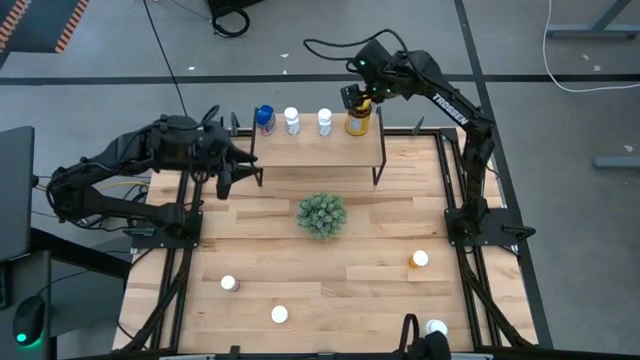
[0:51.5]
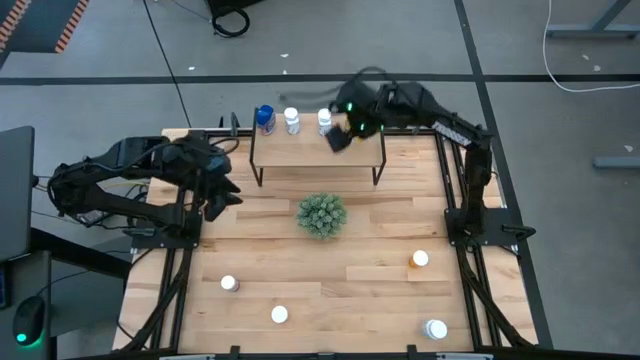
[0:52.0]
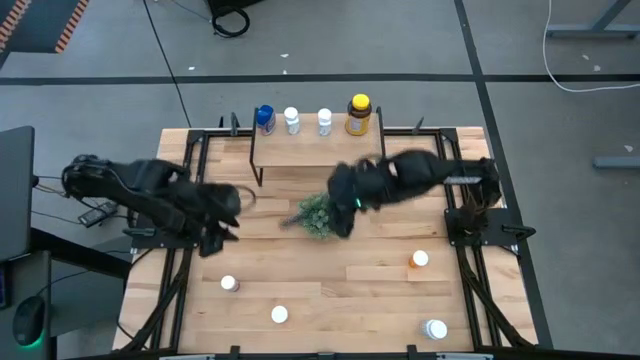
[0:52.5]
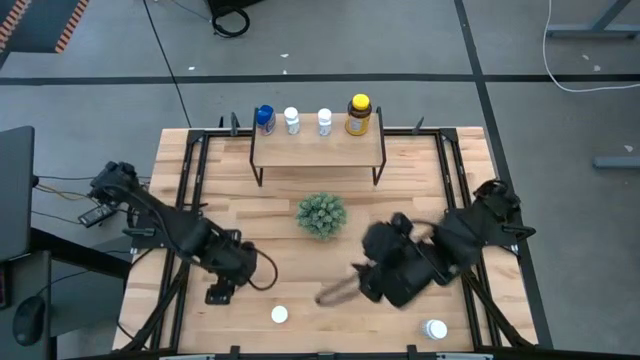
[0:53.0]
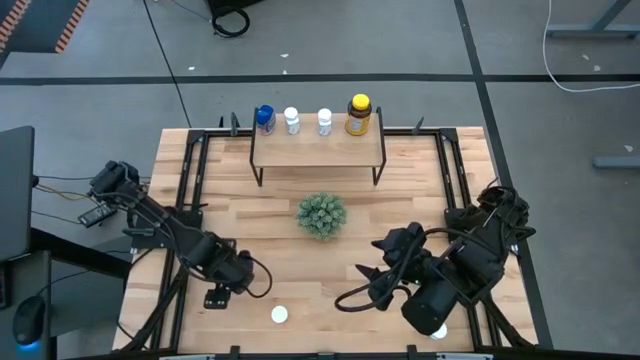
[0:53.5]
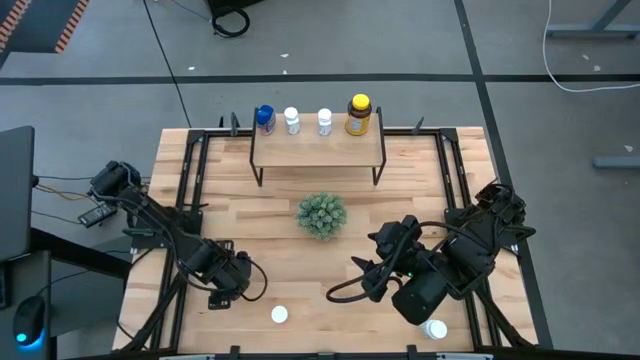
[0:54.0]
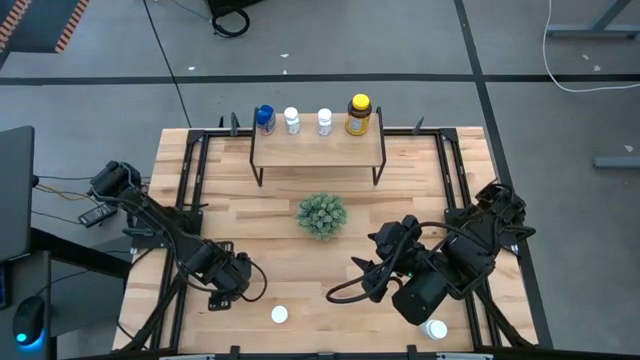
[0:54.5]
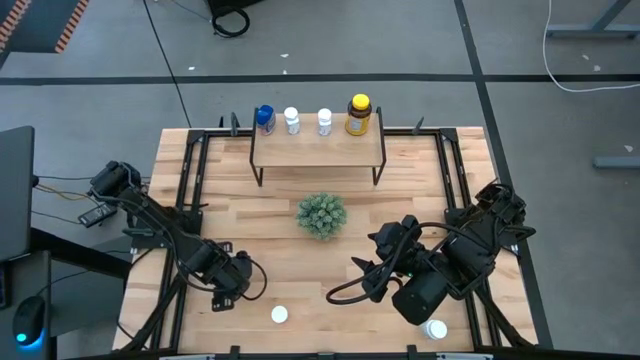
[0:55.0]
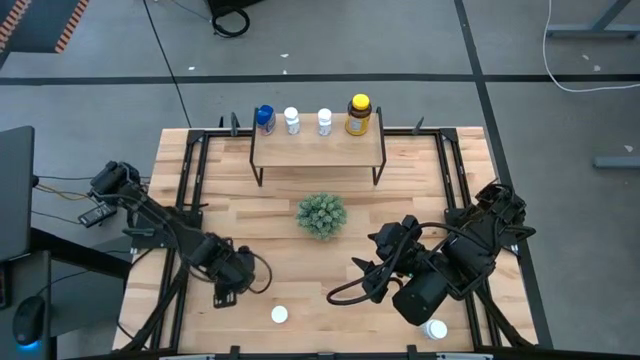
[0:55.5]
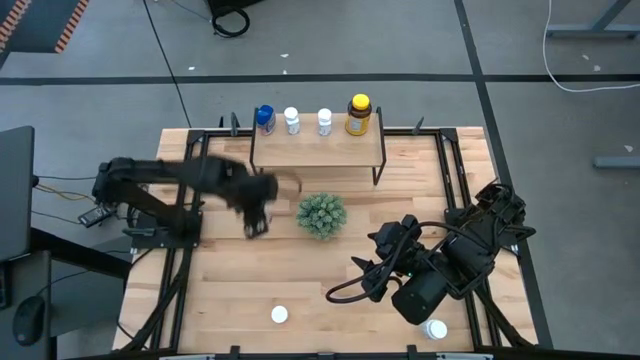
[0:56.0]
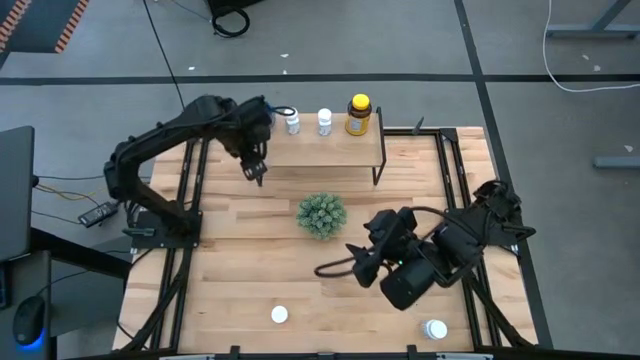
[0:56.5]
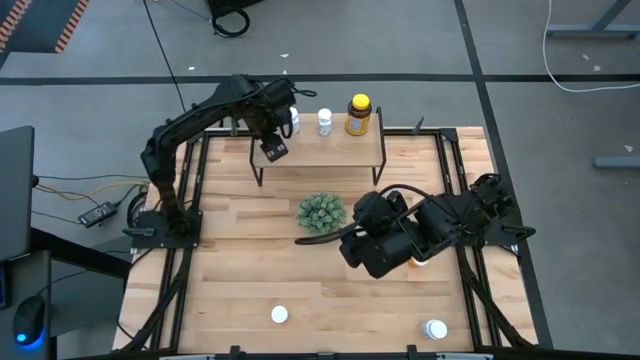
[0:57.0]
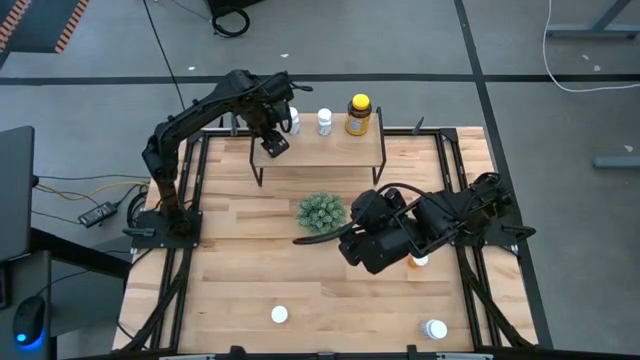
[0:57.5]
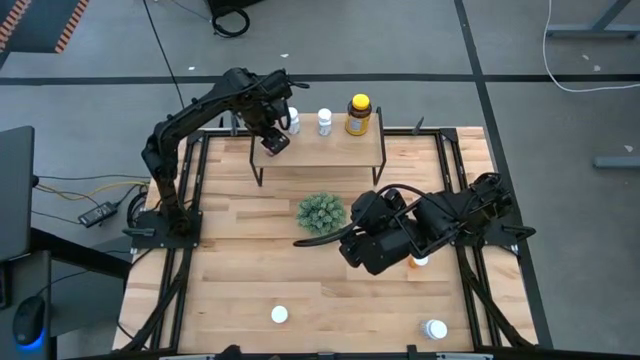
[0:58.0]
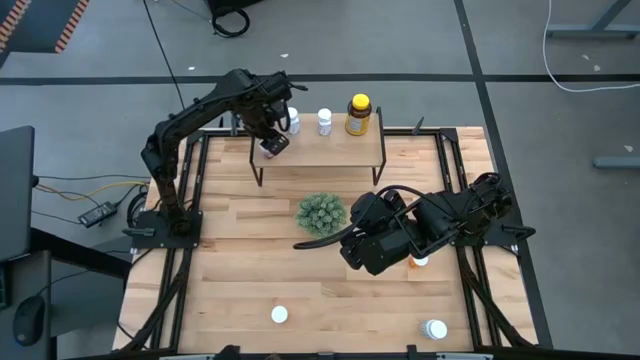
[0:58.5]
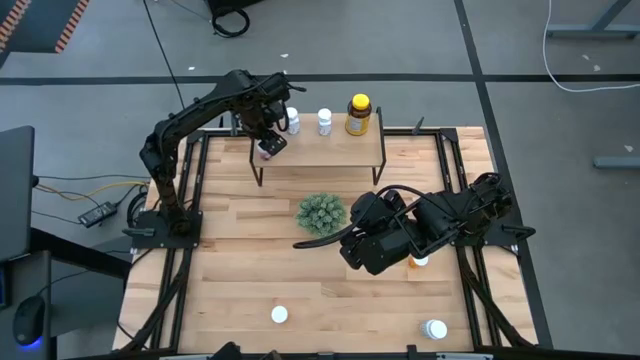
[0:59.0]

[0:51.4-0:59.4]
Task: Pick and place medicine bottles onto shelf by color
Put the pink medicine bottle on the shelf

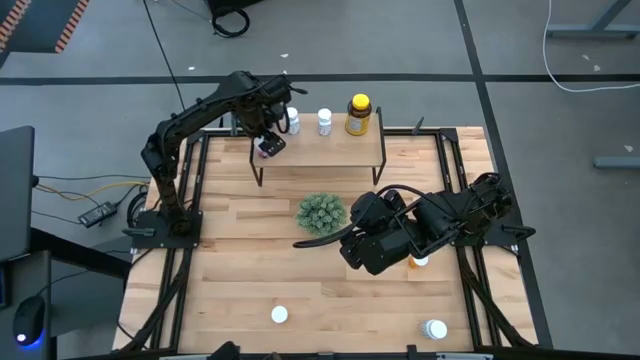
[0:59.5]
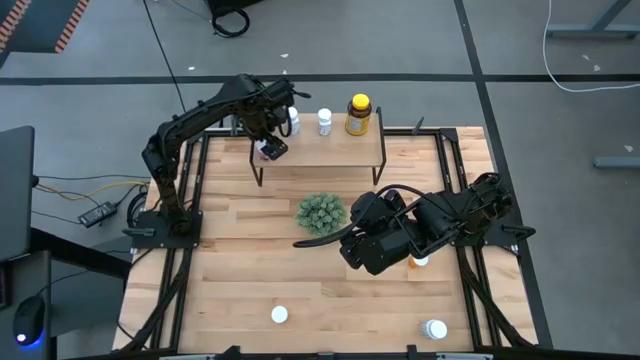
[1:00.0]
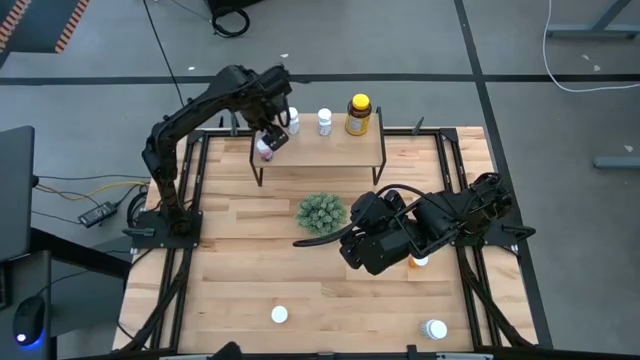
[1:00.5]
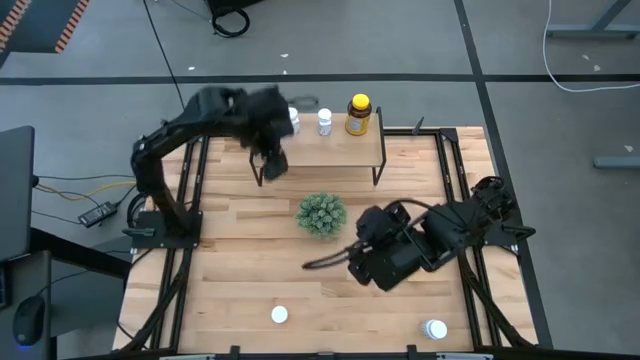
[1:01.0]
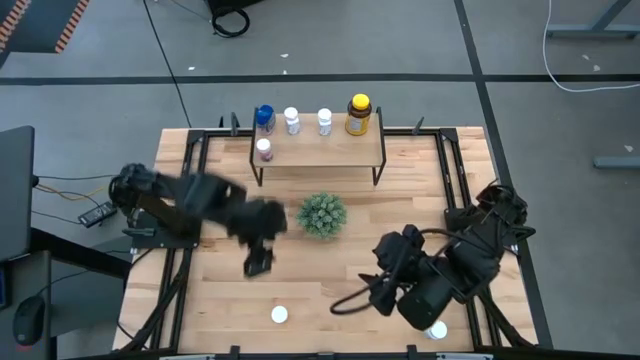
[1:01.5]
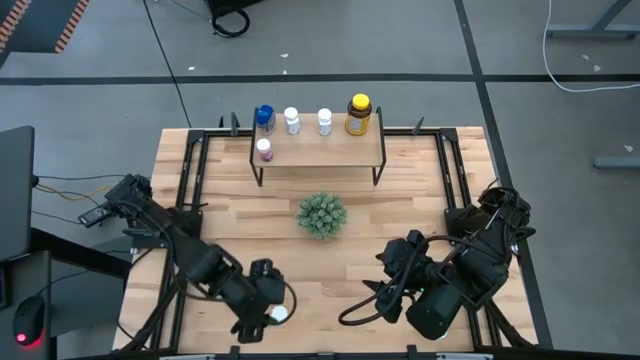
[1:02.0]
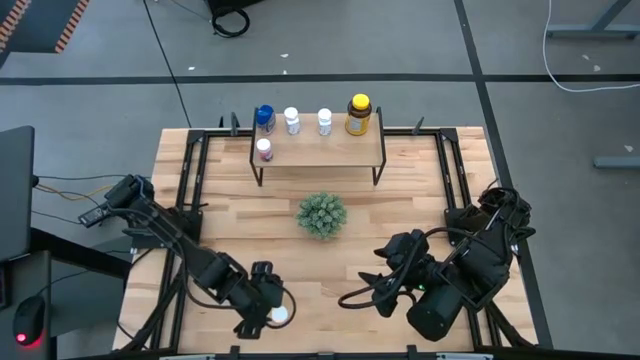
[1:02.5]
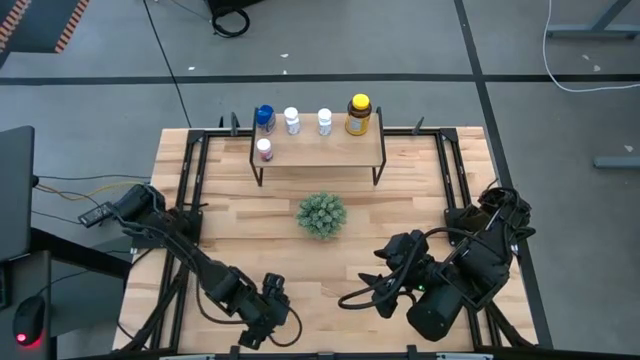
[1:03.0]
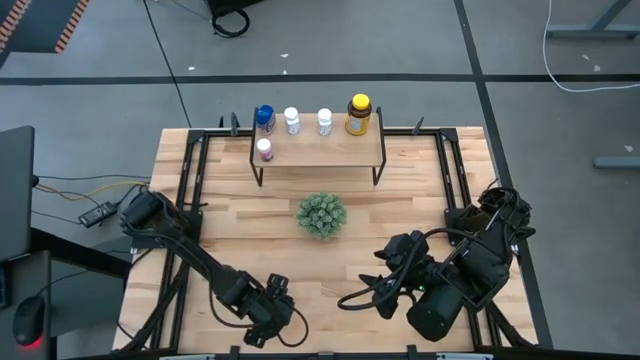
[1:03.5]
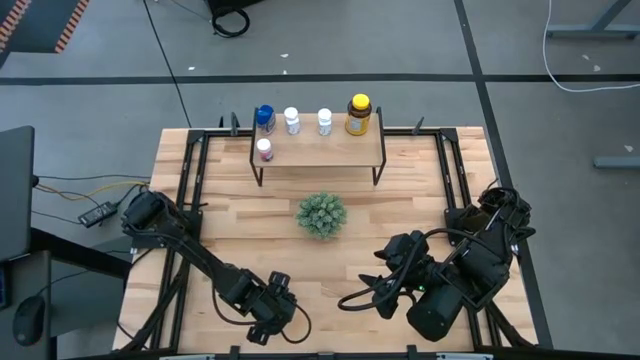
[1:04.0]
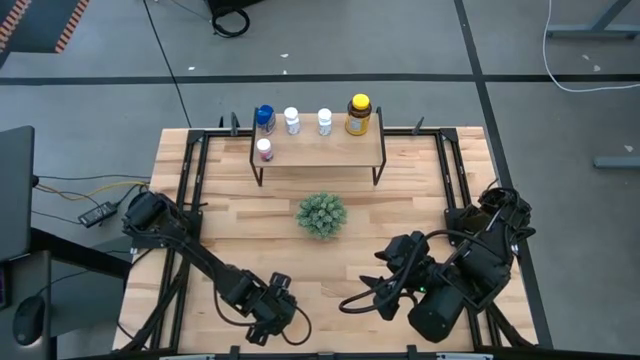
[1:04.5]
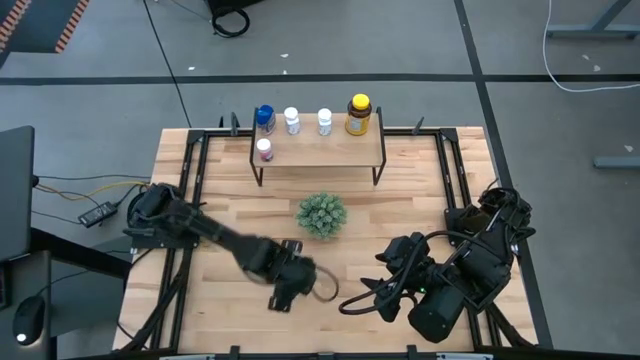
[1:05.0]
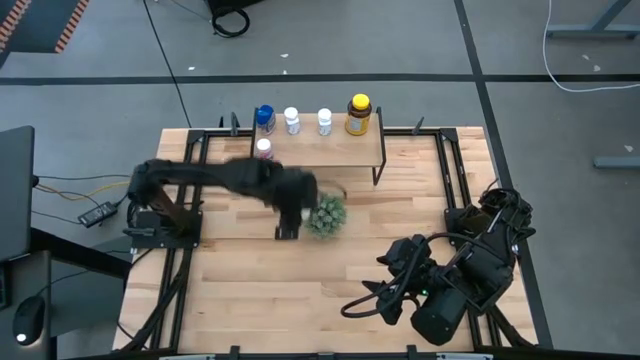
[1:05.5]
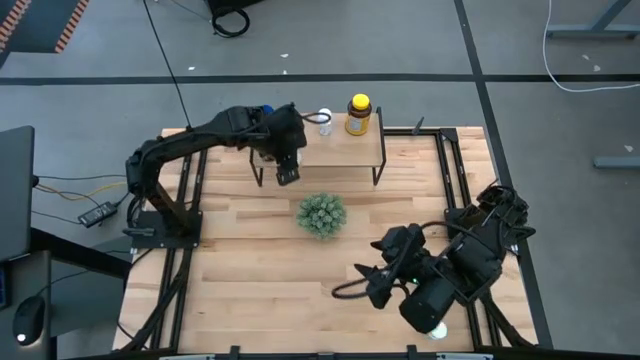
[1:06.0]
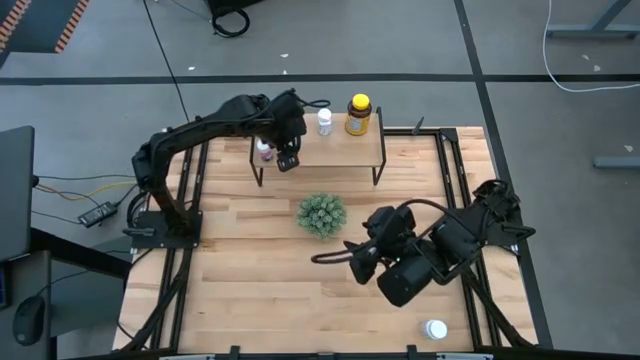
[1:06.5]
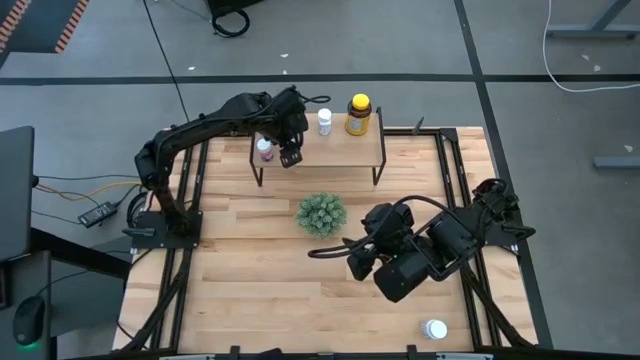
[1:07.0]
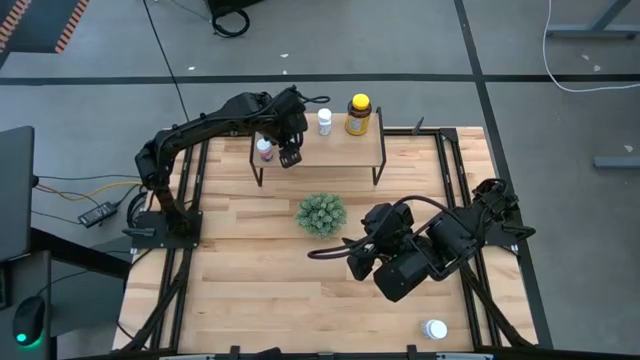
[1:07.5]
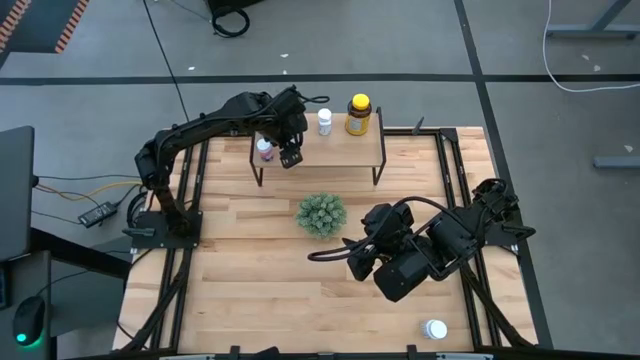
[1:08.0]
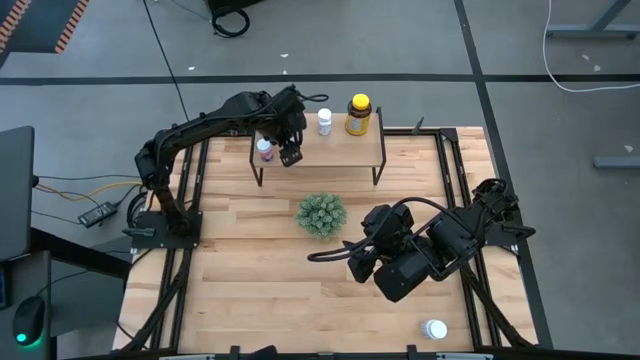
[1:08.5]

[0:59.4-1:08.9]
Put the bottom orange medicine bottle on the shelf

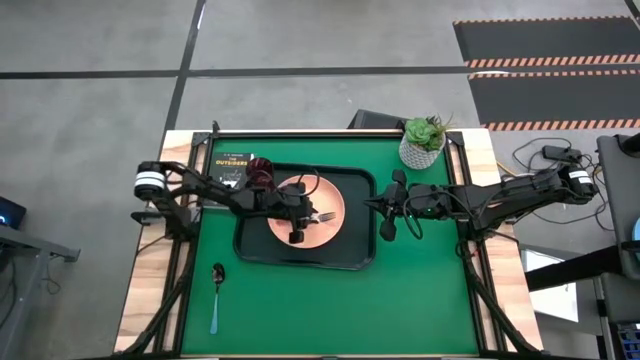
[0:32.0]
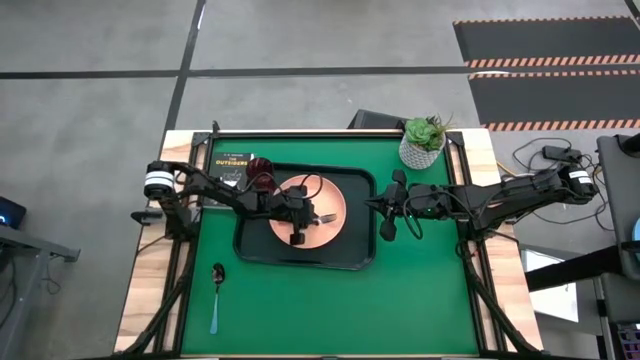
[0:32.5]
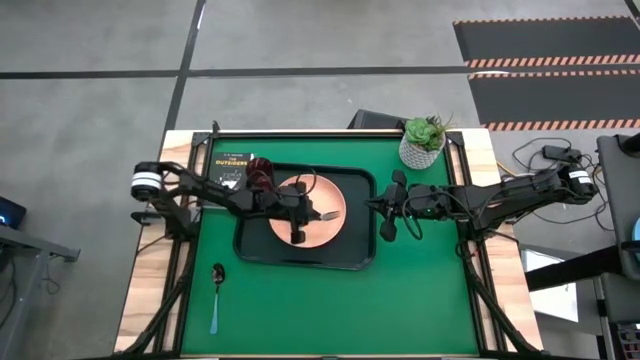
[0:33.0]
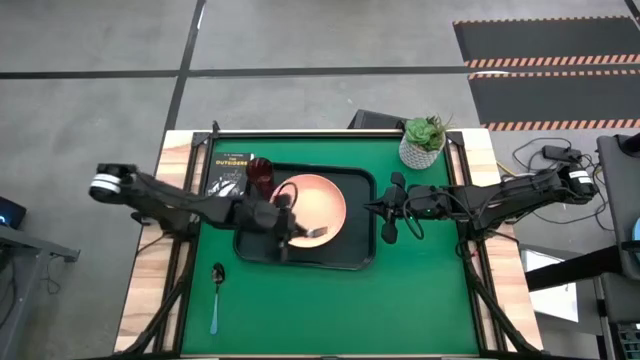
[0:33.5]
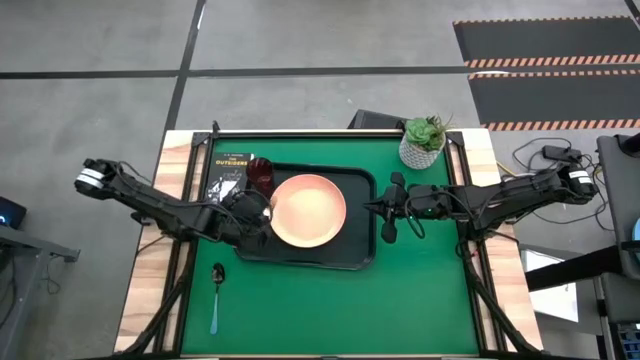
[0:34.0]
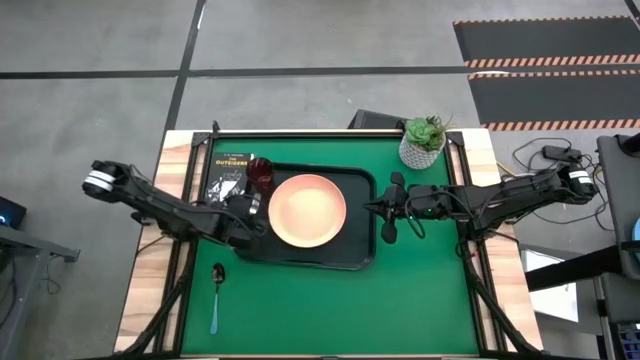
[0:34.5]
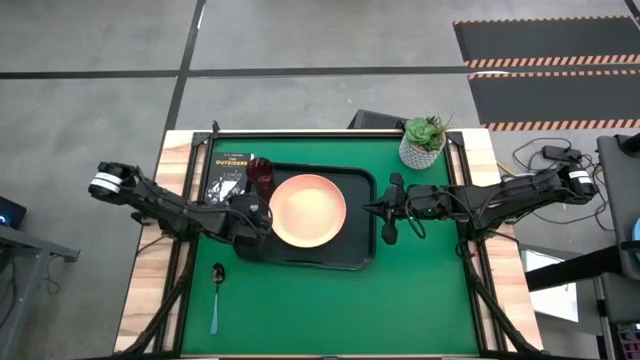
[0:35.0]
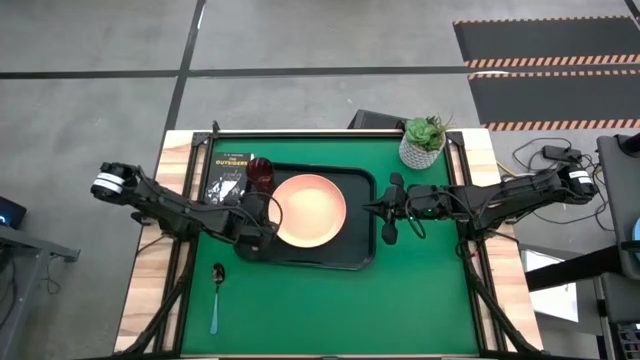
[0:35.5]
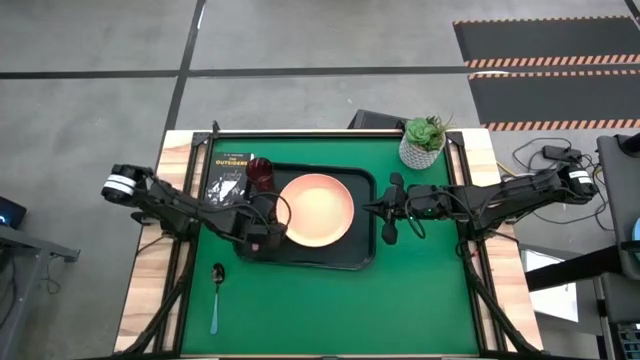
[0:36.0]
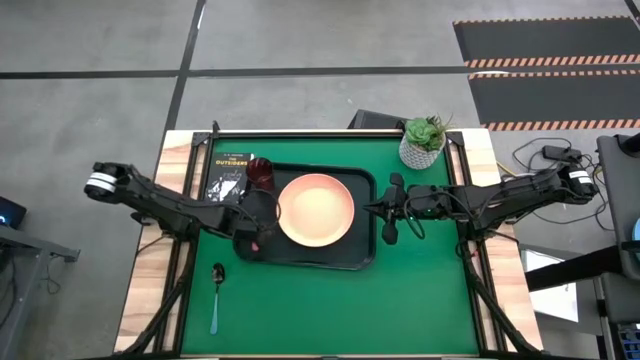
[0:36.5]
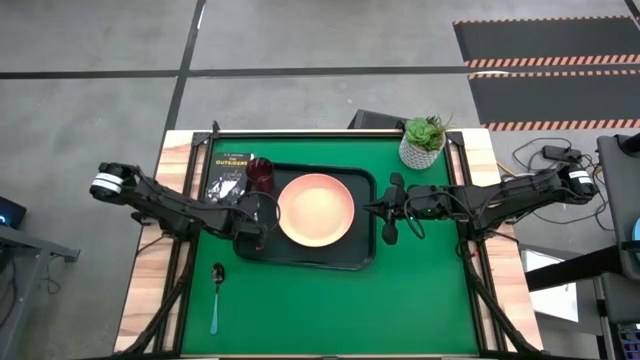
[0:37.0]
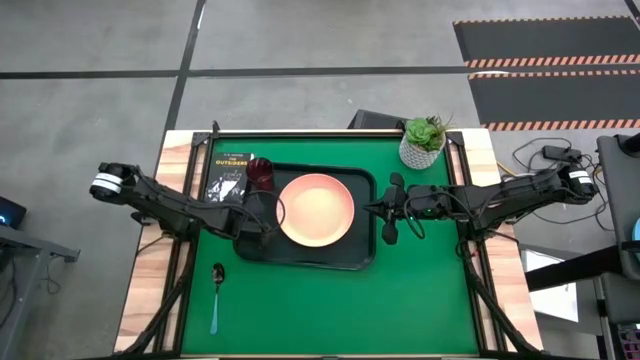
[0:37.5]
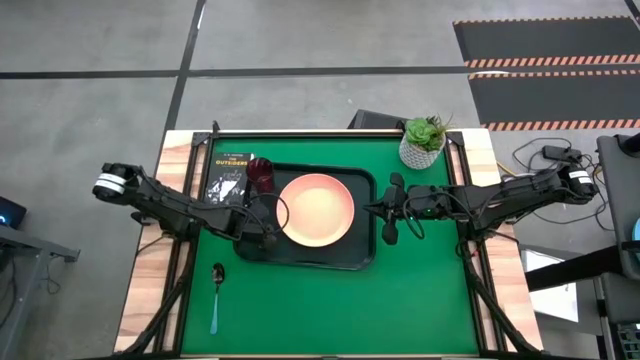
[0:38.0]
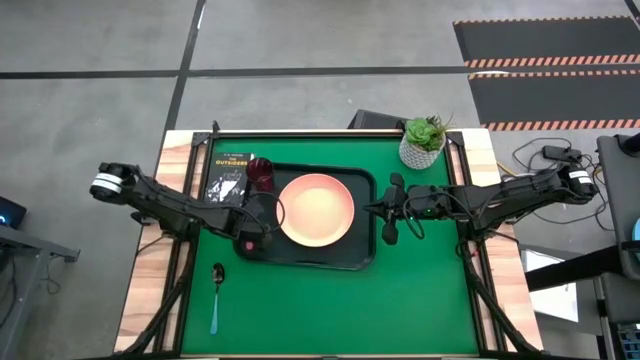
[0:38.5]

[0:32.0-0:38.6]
Task: Pick and place plate/cup/fork/spoon on tray
Put the pink fork on the black table tray to the bottom of the red glass
